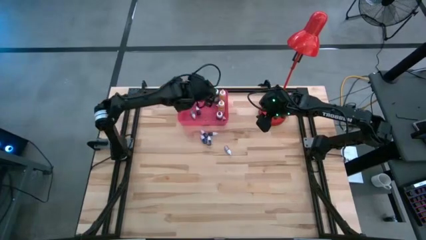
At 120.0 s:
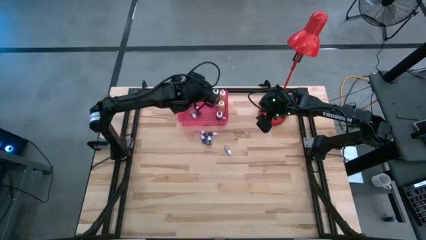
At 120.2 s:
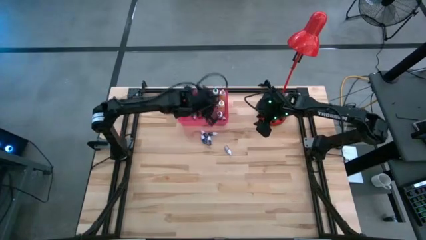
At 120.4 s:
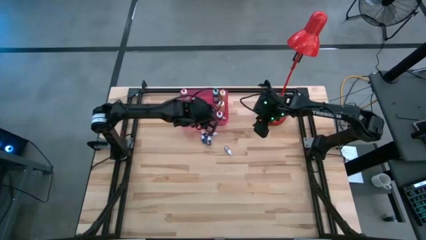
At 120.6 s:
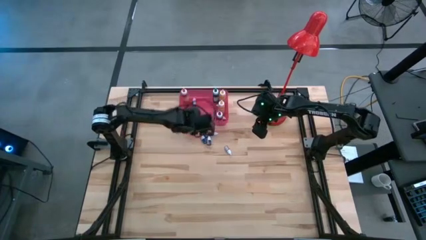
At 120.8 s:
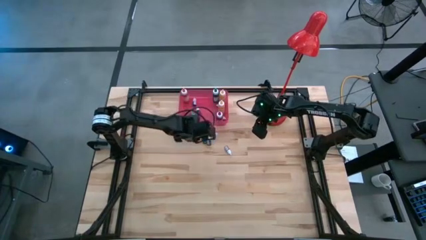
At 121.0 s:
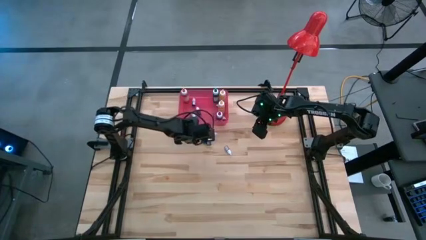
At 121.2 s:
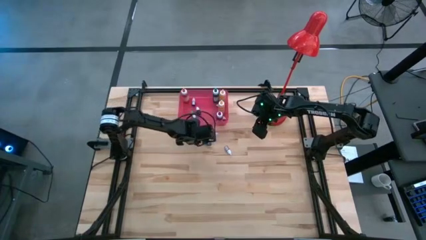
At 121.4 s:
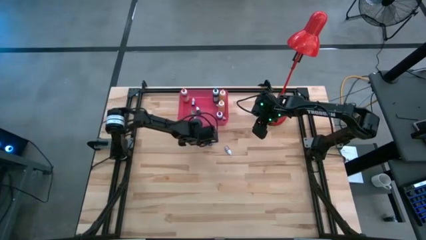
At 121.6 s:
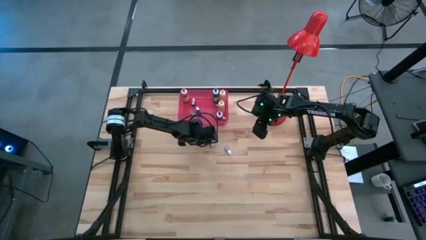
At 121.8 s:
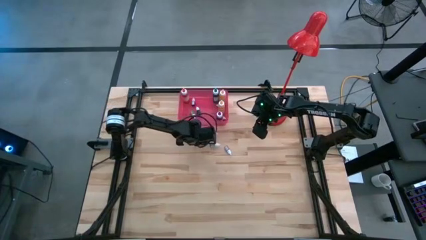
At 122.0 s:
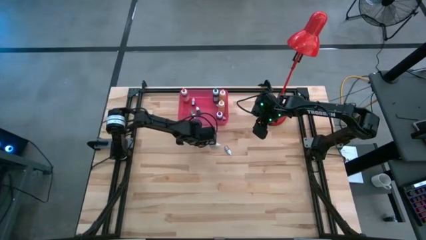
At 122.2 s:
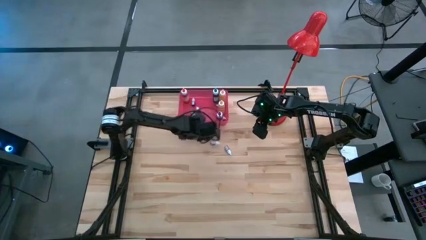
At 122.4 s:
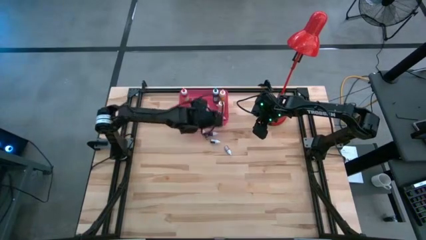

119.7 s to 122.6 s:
Task: Pick & Place food coloring
Put the small blue food coloring bottle into the red bin

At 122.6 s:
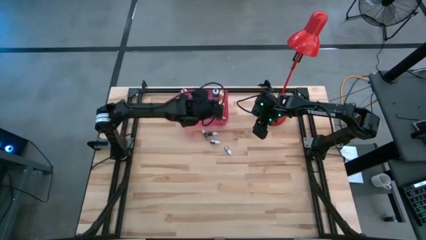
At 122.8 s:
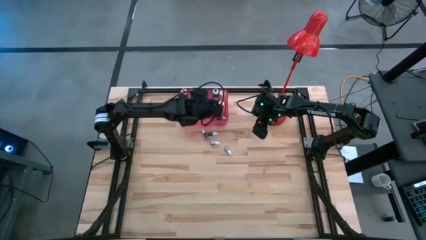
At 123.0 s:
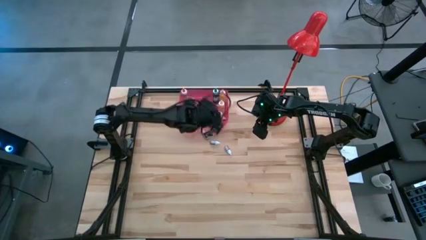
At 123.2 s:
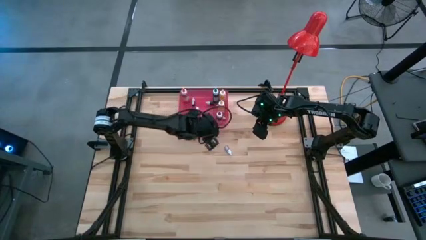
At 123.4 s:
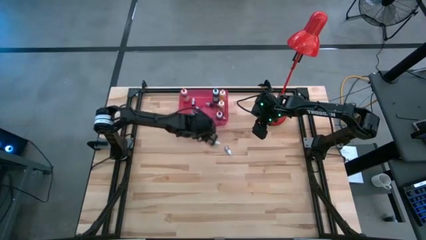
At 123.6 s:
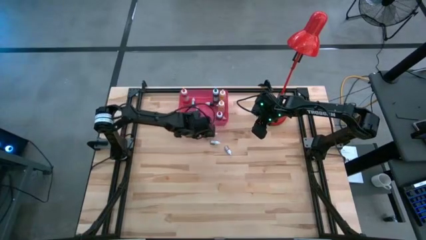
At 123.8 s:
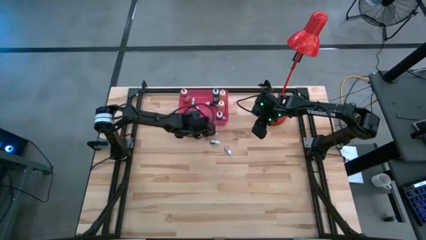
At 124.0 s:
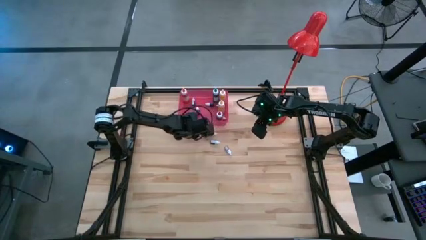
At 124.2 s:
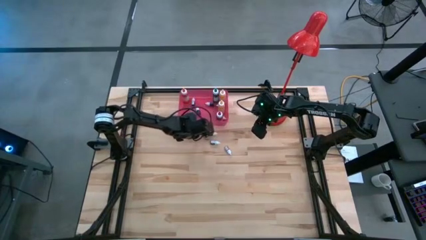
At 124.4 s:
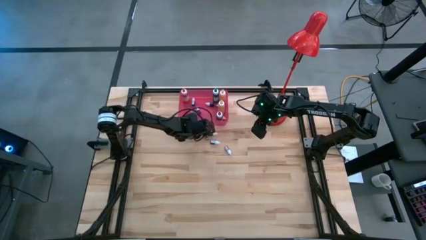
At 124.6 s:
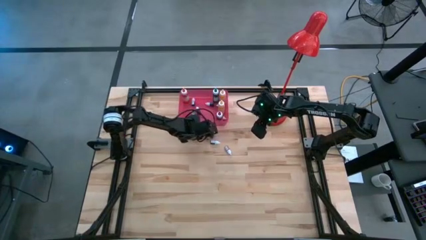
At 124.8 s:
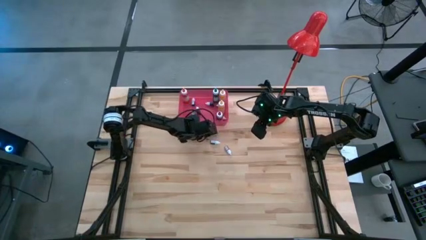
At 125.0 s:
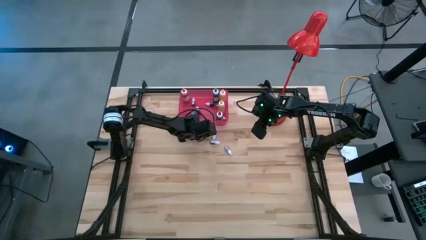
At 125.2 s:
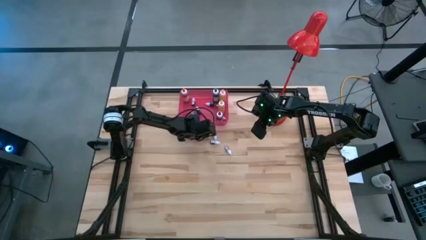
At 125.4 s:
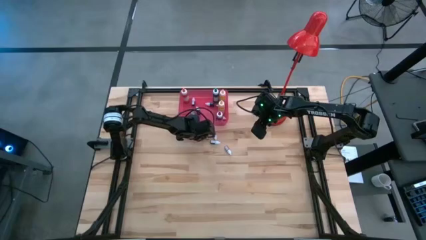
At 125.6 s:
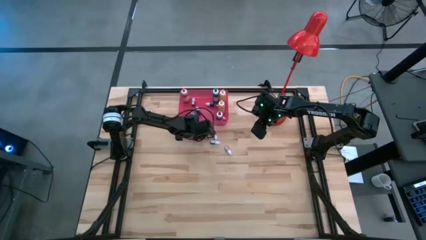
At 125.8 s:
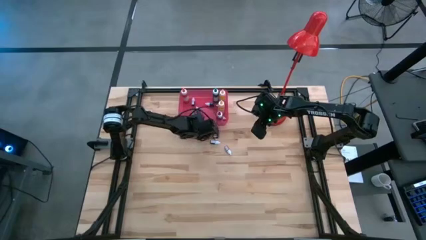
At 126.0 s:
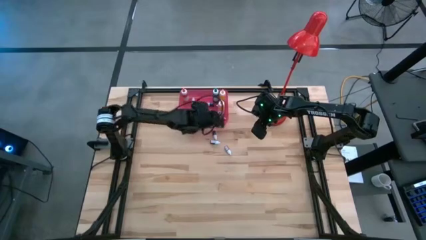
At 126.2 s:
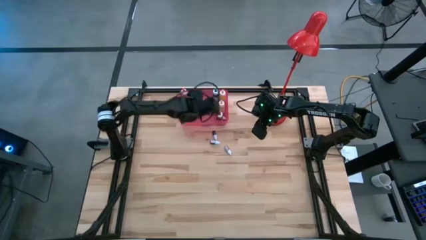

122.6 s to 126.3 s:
Put the small black food coloring bottle into the red bin

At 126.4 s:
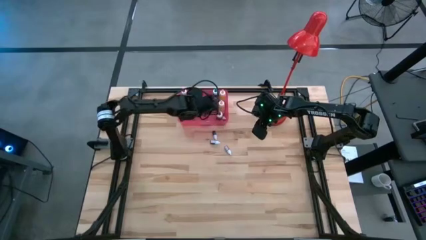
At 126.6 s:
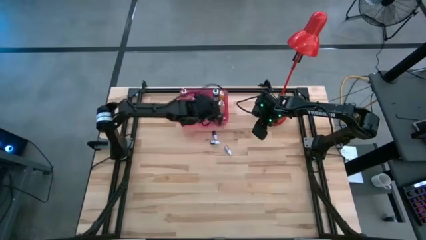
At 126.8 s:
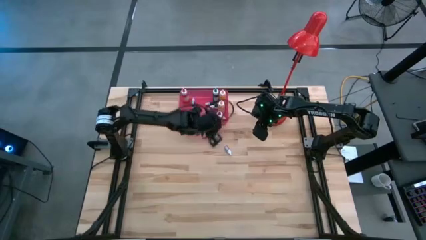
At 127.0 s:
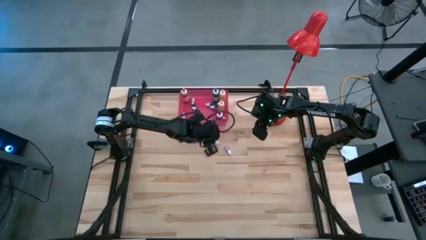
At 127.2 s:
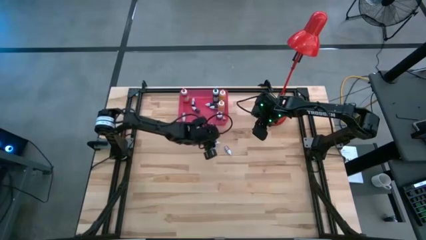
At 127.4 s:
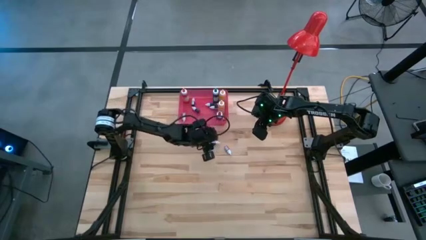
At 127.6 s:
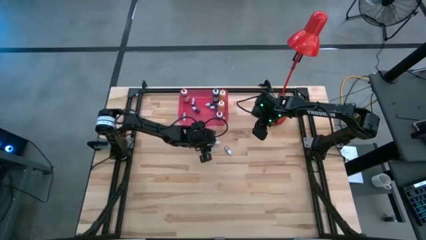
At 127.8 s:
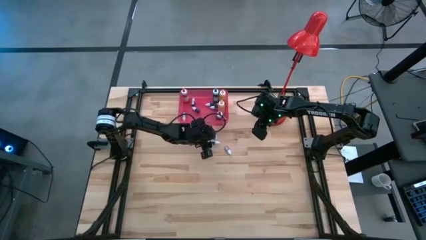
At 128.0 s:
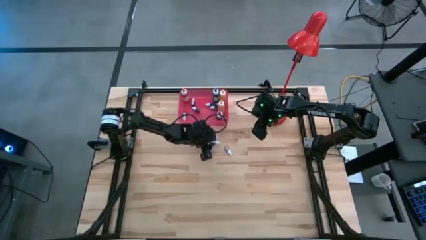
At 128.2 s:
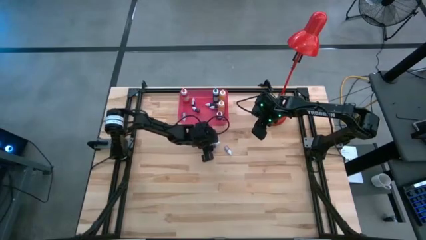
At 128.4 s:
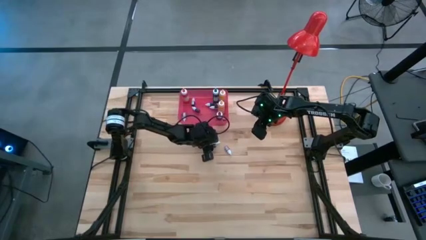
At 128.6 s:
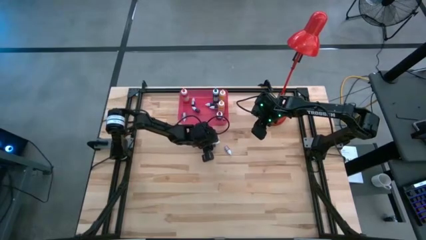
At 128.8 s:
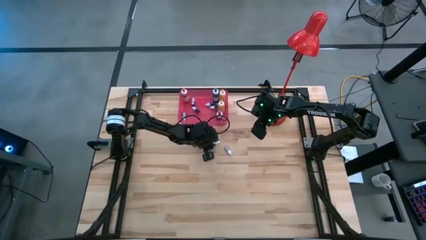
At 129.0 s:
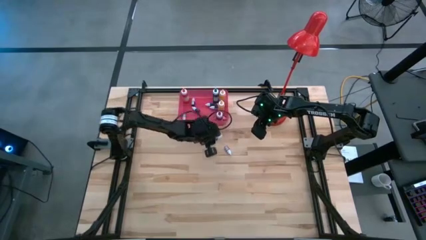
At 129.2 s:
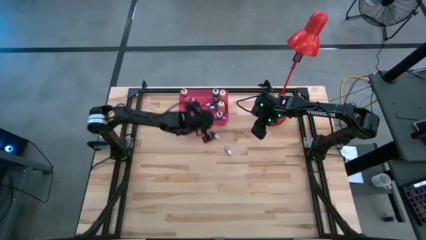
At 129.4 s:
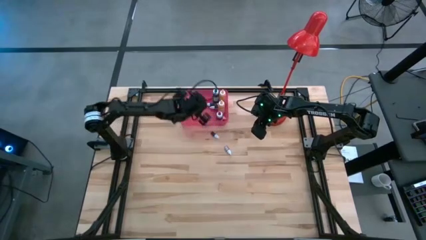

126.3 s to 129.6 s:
Put the small green food coloring bottle into the red bin

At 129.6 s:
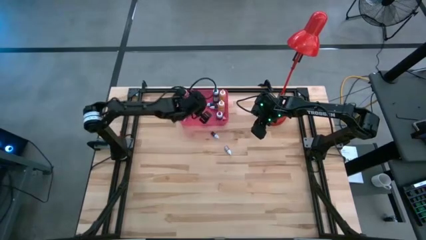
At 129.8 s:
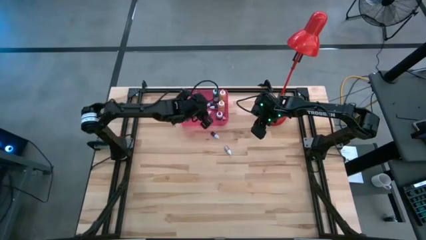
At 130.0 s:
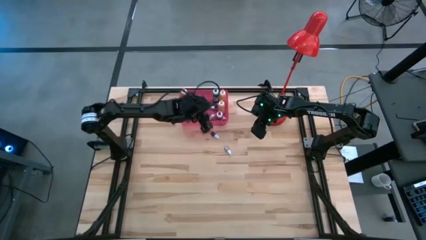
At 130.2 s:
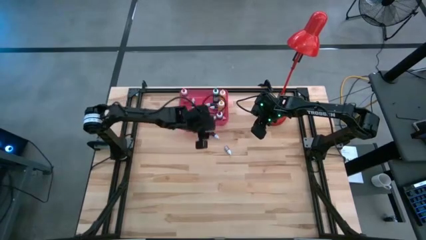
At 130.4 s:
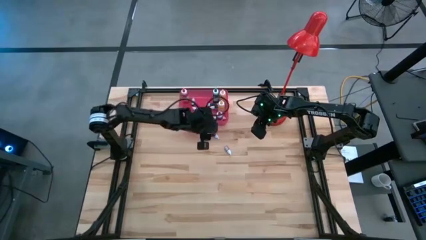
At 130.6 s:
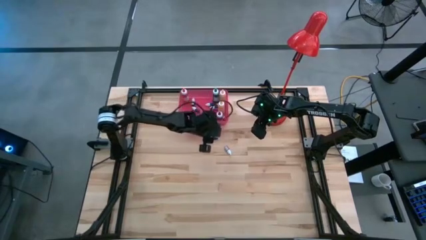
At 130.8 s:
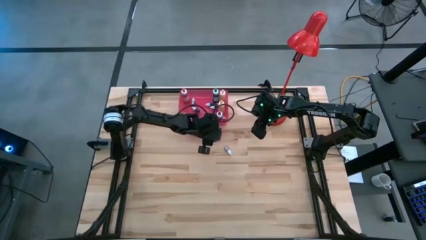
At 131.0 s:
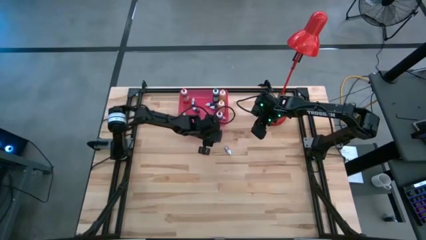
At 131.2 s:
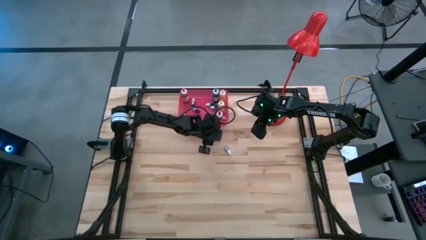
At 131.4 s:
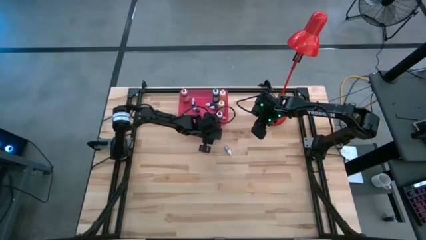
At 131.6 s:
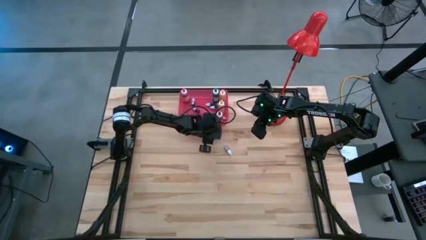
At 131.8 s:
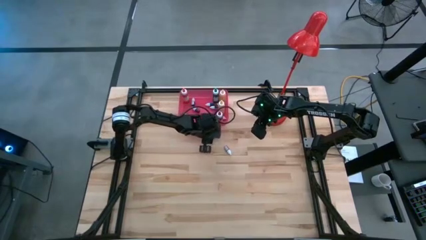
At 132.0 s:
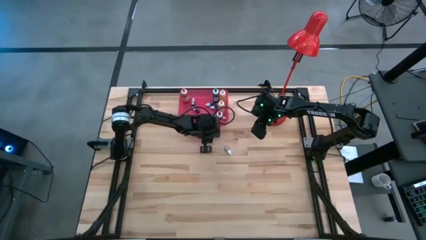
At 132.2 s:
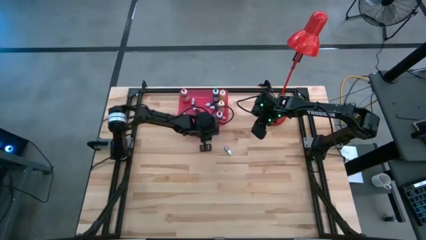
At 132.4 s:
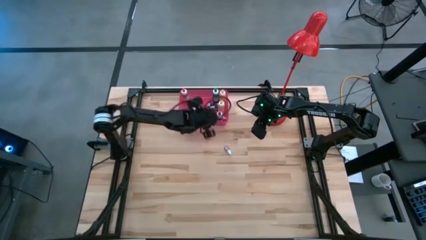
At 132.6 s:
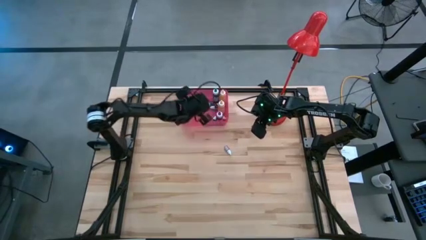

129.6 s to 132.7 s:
Put the small black food coloring bottle into the red bin

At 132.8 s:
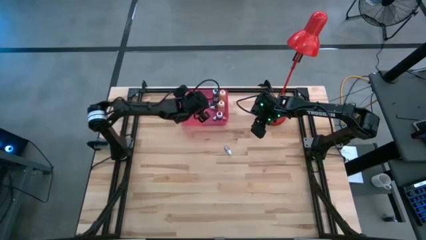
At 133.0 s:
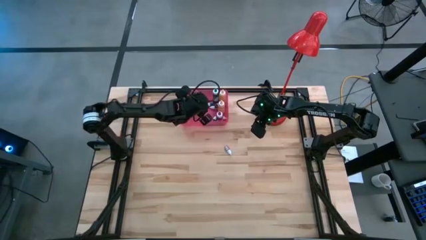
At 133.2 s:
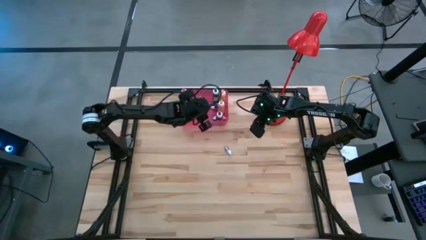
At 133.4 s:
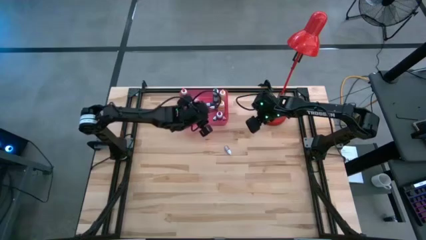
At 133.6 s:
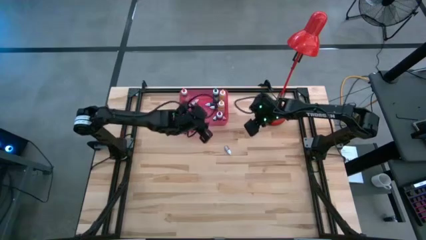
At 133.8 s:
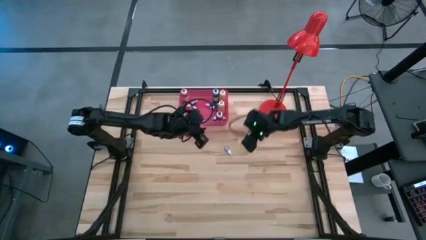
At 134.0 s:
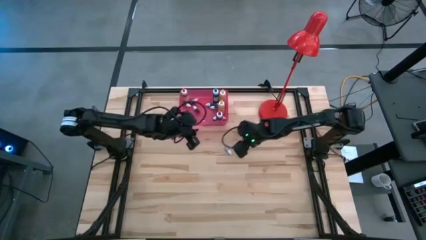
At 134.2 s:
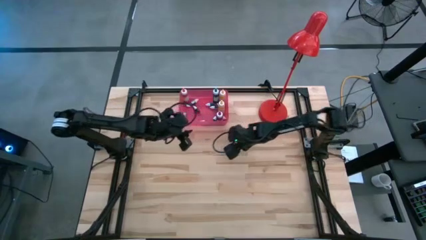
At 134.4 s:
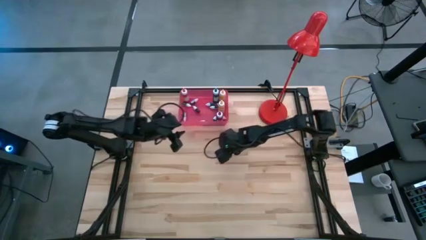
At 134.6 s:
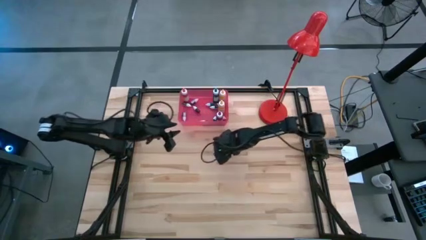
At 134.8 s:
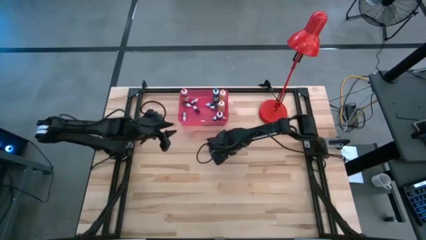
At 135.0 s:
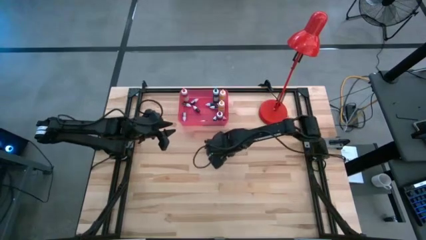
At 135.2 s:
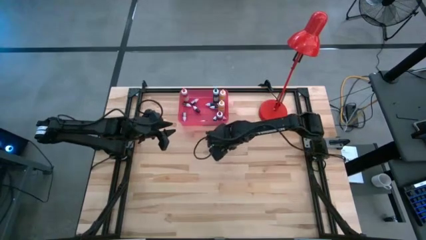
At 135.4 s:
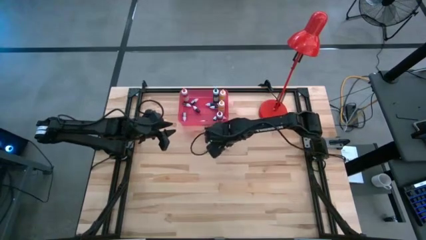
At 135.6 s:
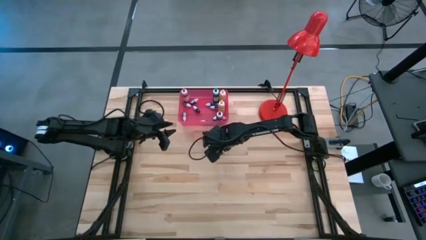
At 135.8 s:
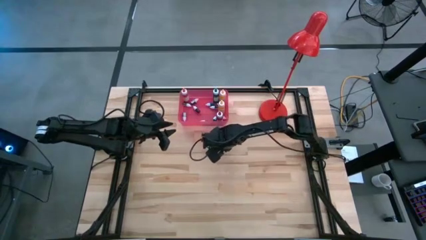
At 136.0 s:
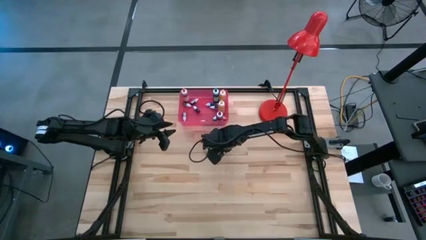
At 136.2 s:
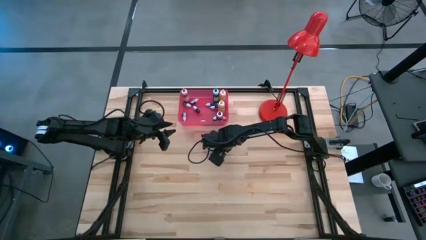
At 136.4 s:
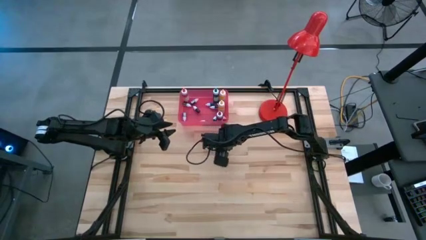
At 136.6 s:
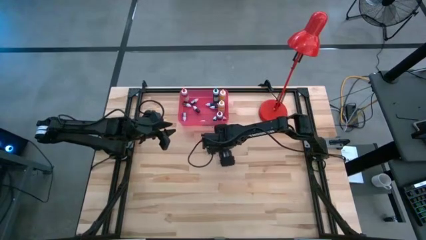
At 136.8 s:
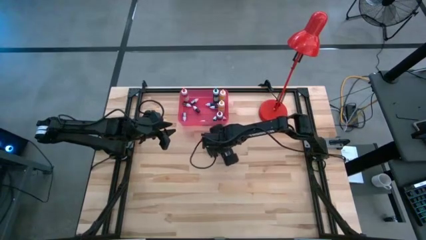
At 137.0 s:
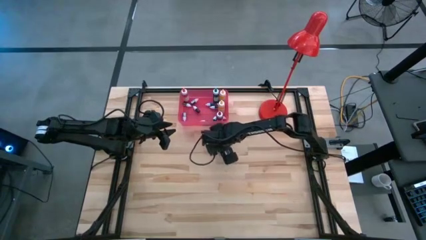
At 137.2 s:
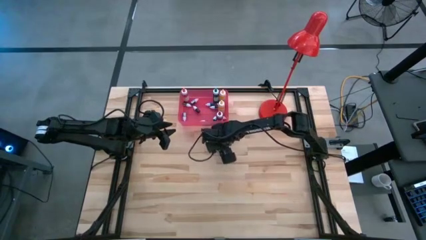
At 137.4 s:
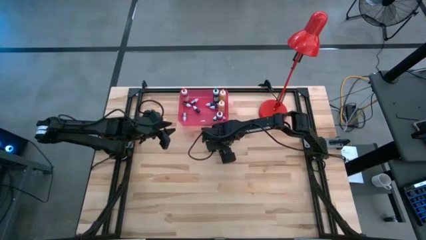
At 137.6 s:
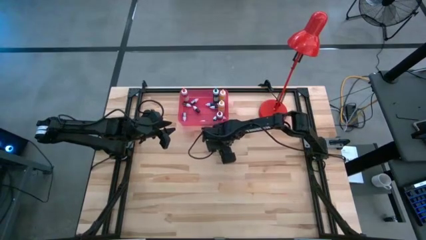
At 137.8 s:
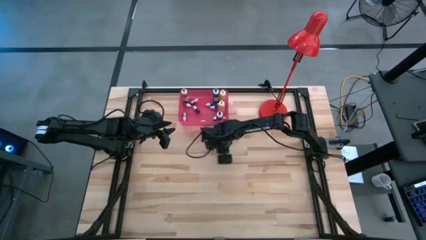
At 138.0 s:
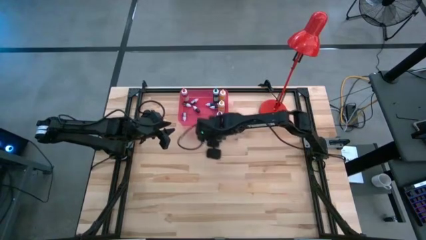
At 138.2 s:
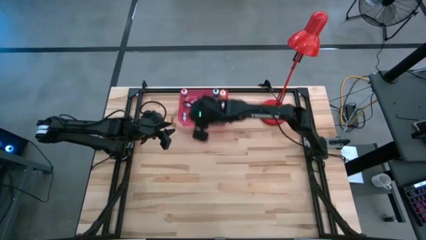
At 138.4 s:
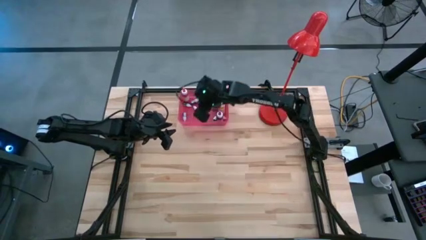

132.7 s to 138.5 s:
Put the small orange food coloring bottle into the red bin
